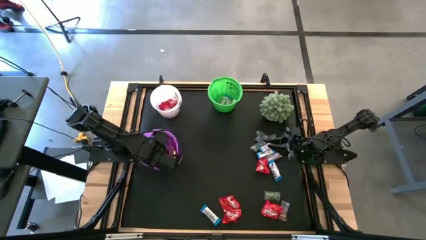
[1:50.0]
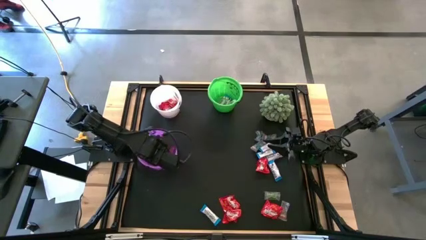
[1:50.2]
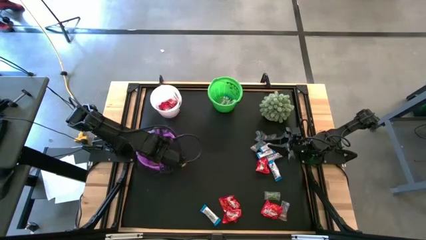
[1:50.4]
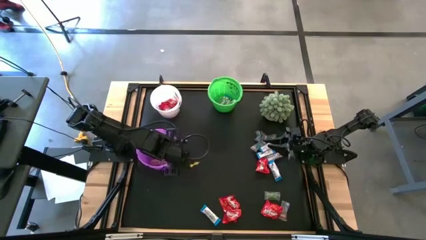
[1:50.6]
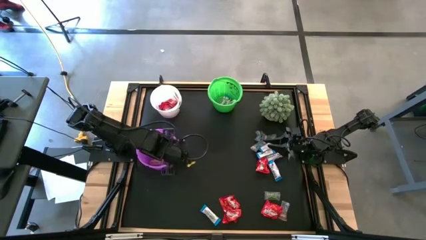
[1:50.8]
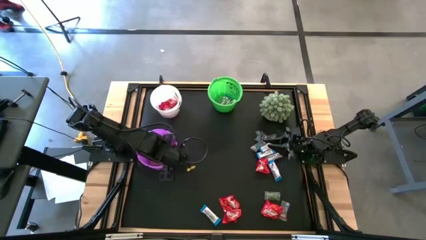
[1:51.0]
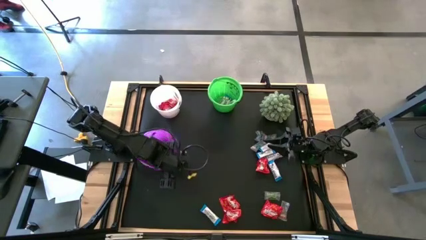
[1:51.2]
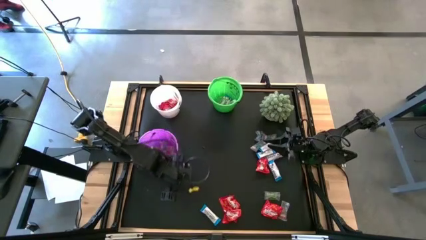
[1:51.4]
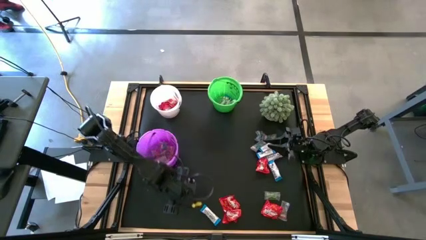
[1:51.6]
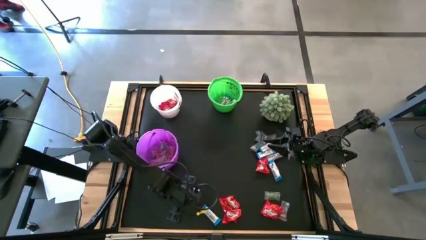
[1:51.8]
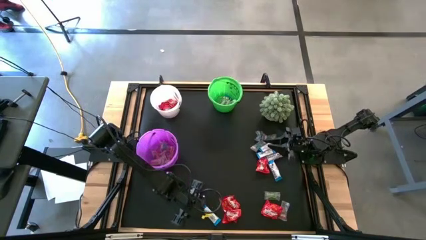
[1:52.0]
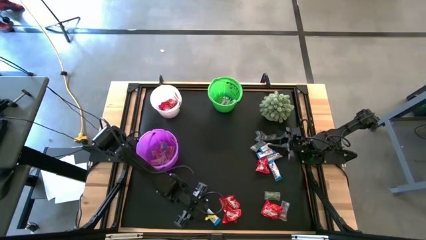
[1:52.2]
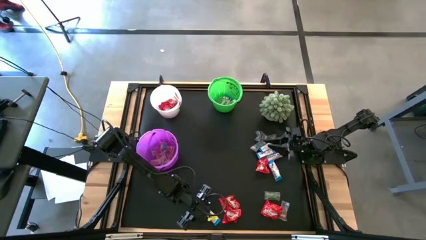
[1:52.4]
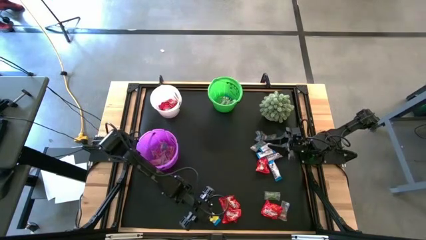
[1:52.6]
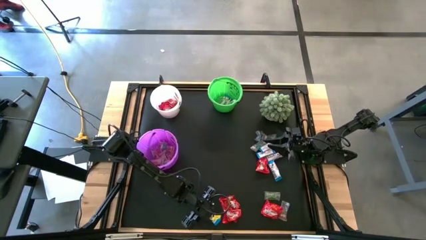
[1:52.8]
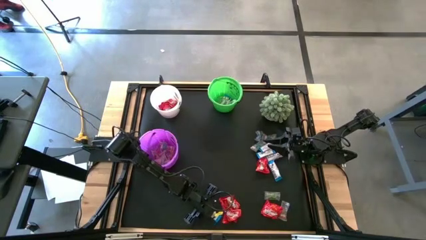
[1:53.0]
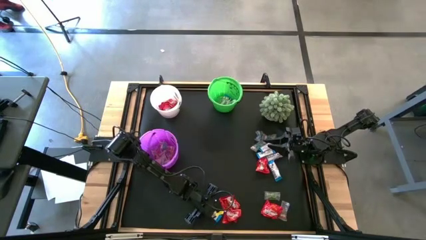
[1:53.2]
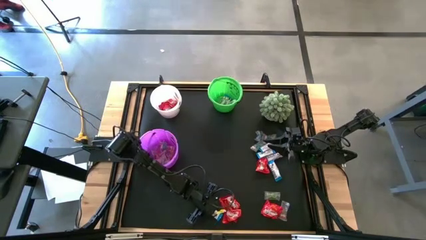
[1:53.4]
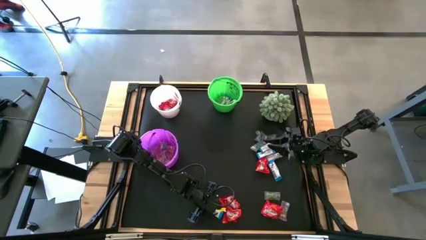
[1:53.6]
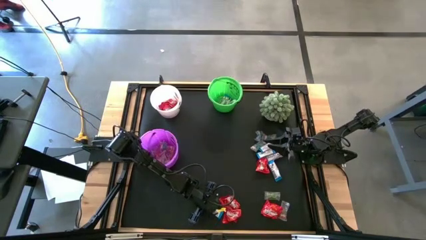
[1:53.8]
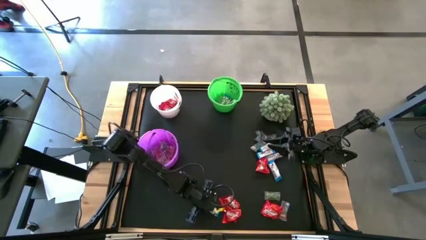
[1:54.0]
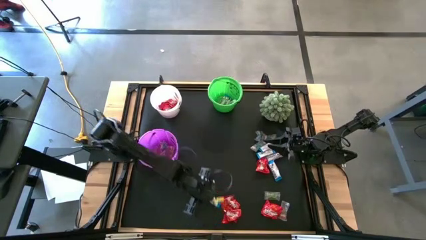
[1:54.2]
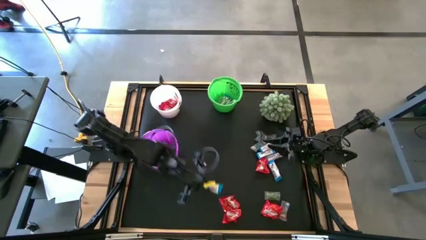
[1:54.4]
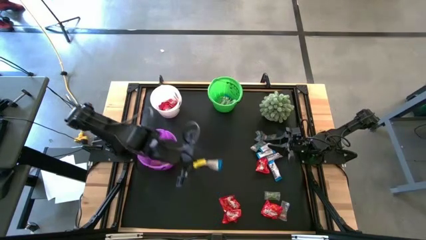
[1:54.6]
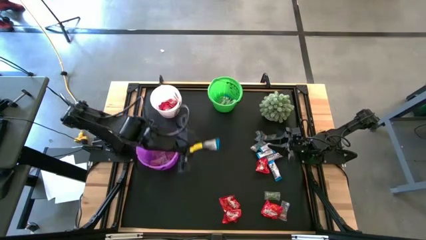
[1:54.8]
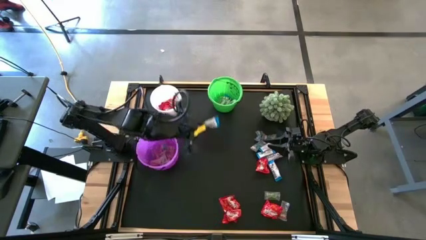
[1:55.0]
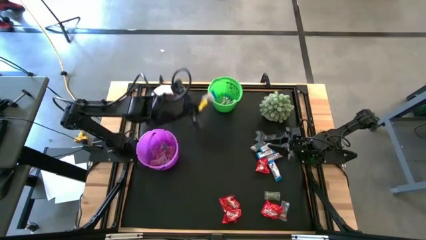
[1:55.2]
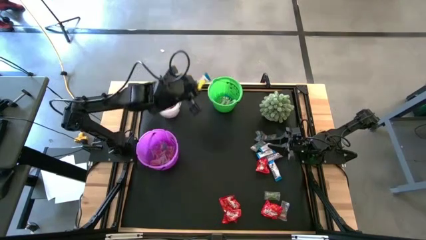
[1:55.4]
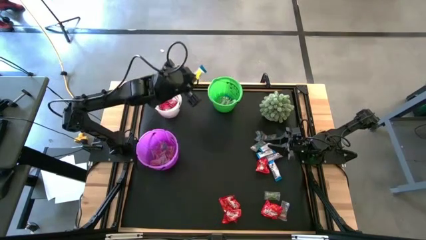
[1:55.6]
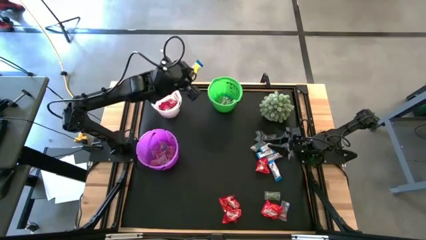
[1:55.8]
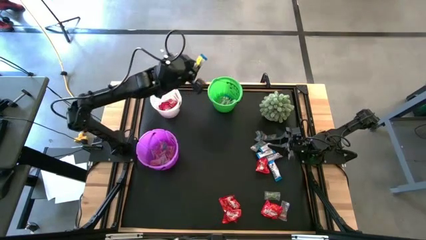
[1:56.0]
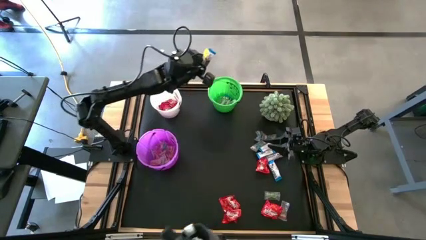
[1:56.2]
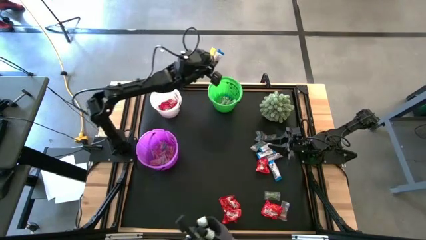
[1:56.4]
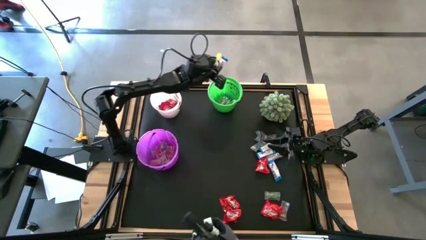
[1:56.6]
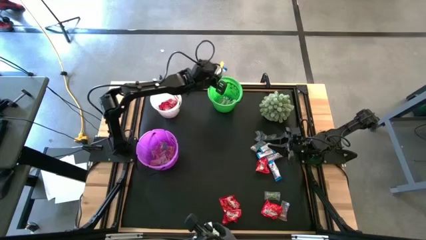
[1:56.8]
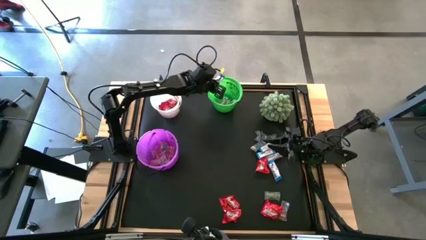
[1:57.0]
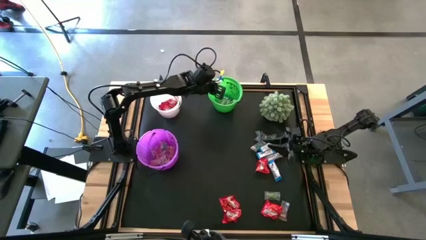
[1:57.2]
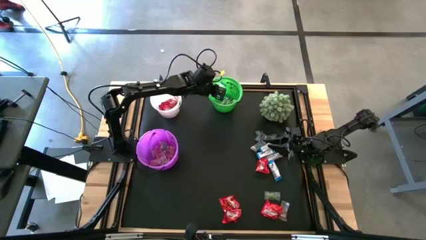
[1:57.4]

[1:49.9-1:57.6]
Task: Sort candy
Put the white chocolate into the green bucket

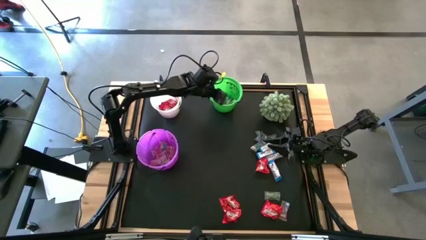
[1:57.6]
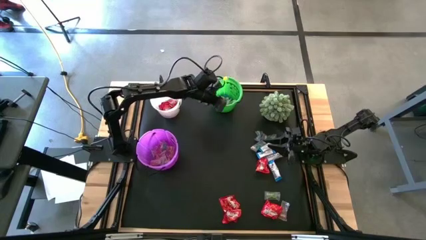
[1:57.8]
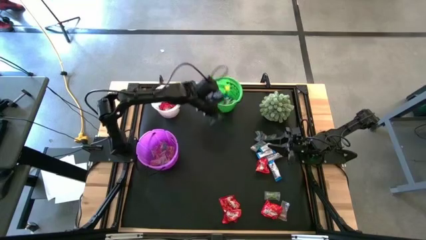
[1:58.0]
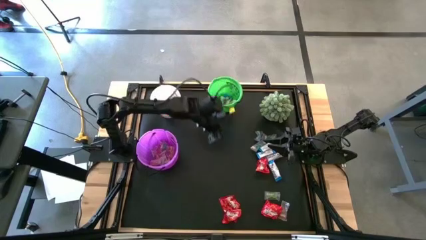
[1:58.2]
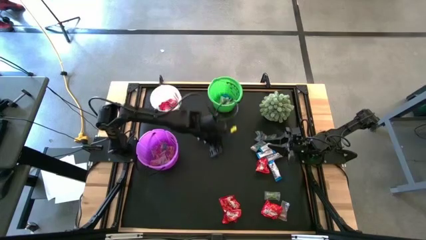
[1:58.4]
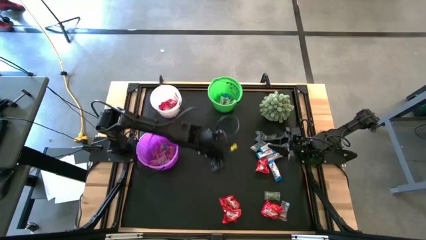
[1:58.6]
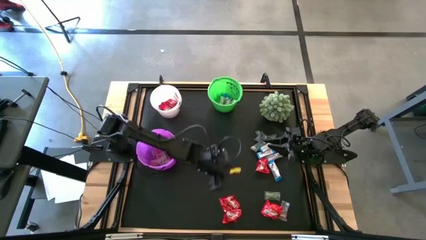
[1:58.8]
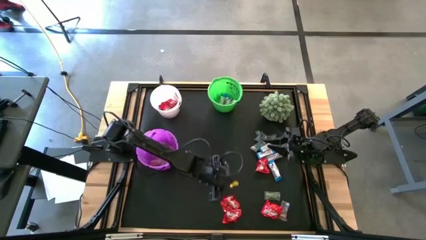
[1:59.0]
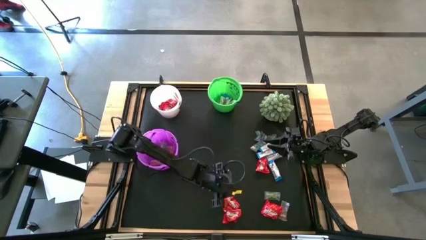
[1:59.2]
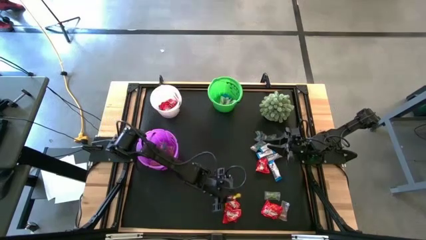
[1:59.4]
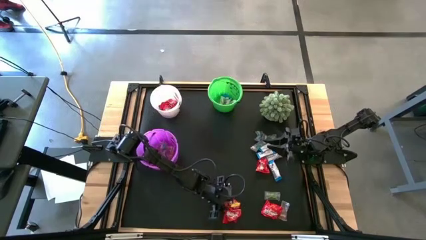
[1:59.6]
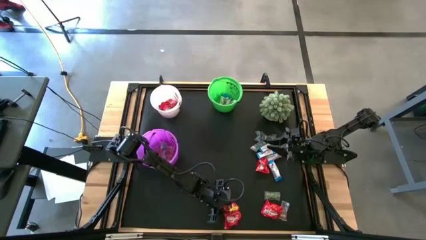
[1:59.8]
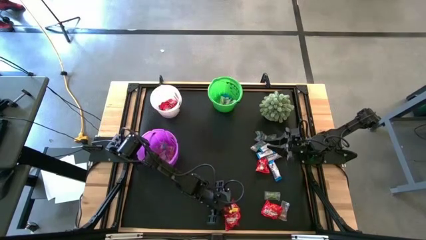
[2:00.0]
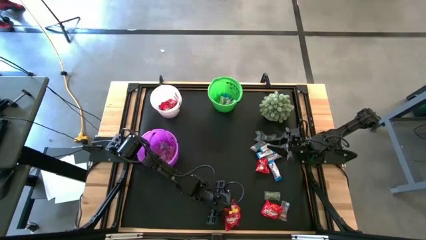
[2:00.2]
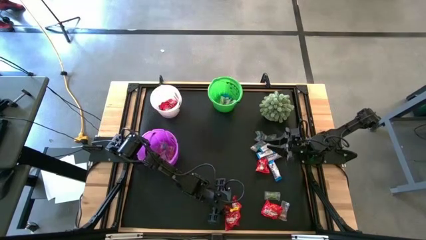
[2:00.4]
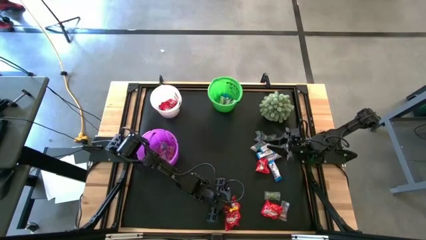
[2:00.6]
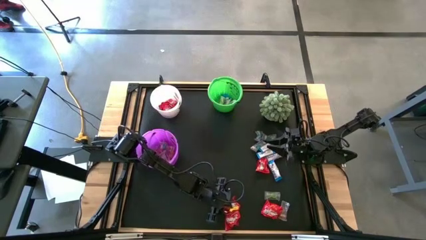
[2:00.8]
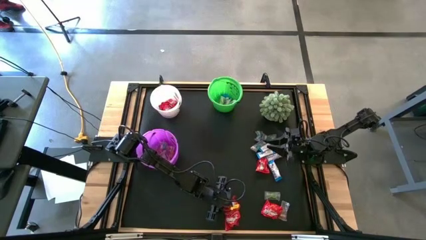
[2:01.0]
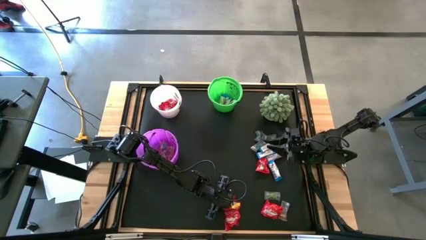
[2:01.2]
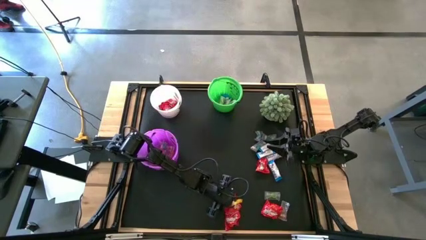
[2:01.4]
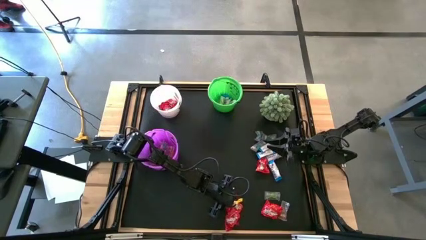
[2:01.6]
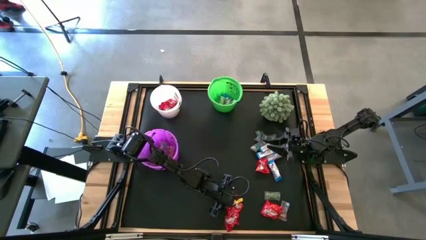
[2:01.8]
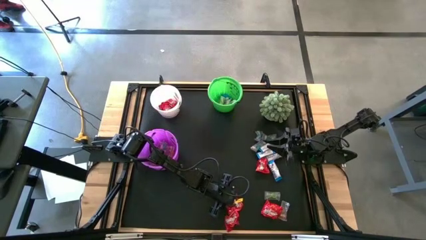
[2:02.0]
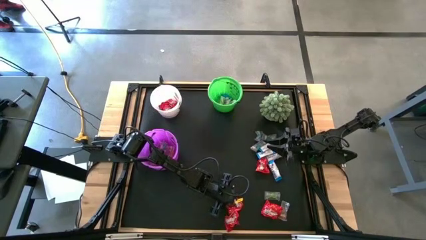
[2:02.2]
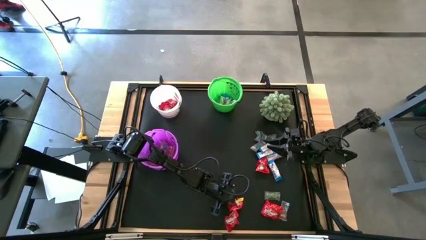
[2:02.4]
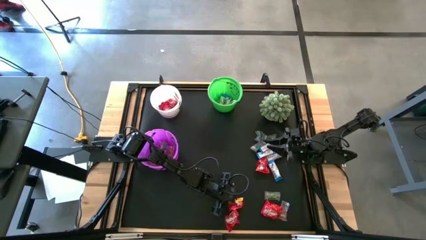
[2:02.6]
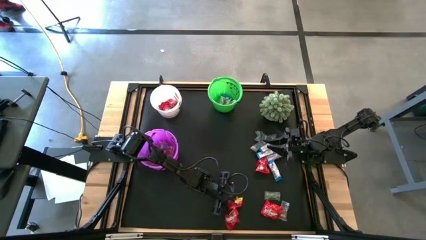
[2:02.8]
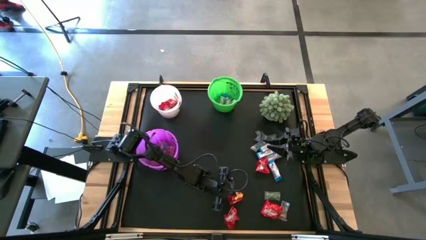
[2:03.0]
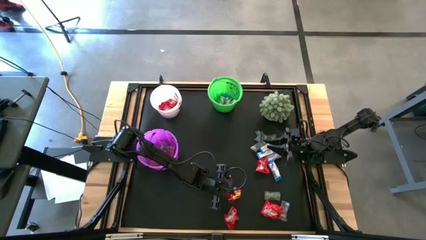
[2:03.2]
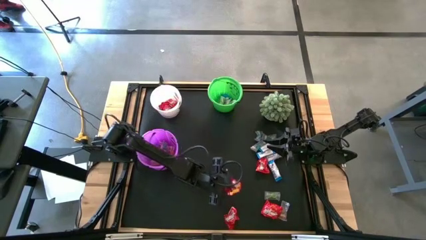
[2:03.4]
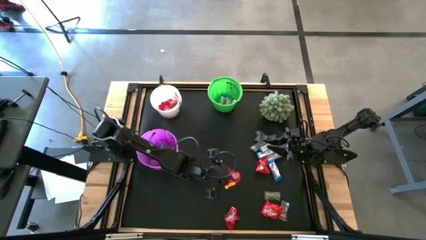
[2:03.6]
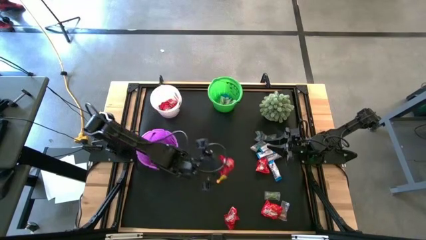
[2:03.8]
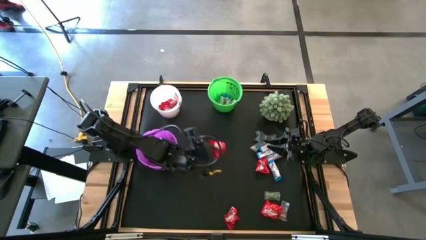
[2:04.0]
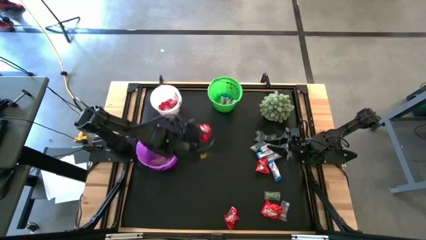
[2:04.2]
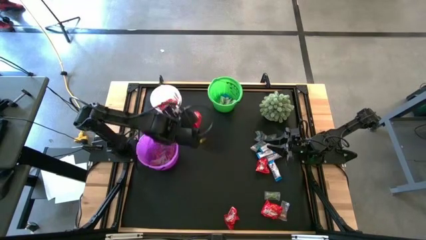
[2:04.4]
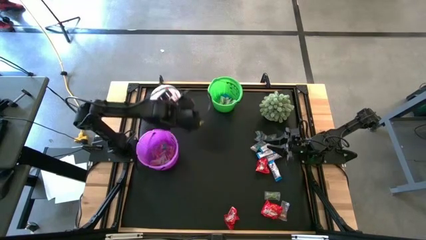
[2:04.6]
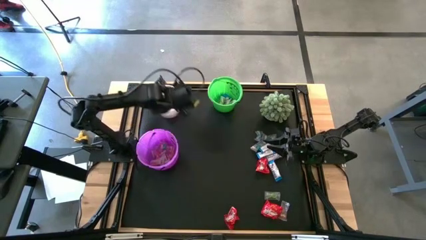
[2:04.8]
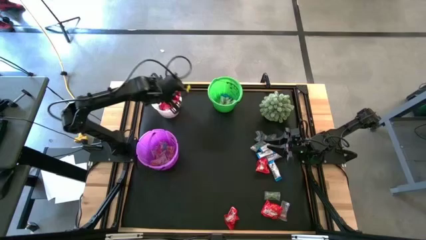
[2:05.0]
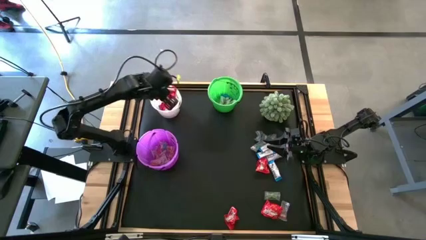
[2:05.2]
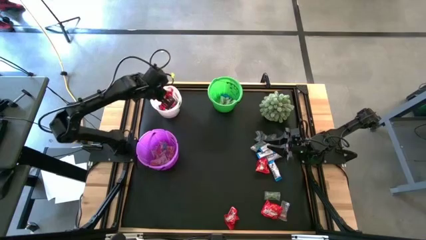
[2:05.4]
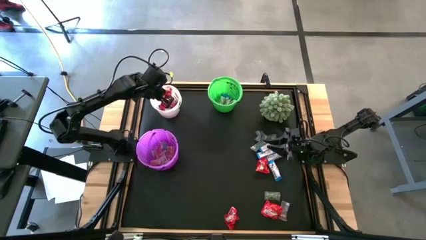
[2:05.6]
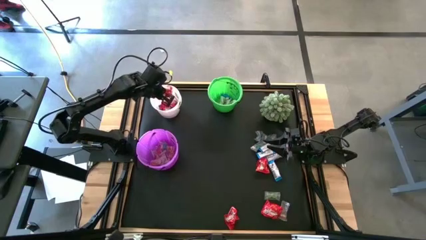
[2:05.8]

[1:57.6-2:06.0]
Put the red candy into the white bucket
